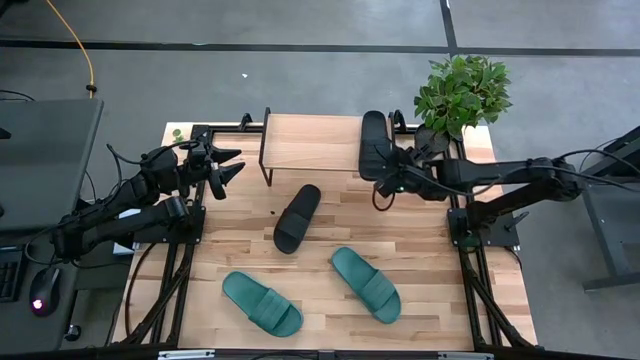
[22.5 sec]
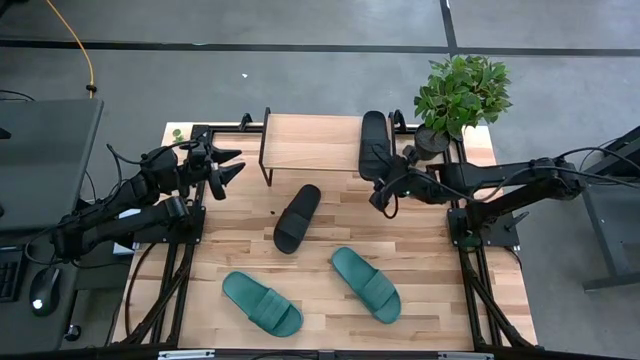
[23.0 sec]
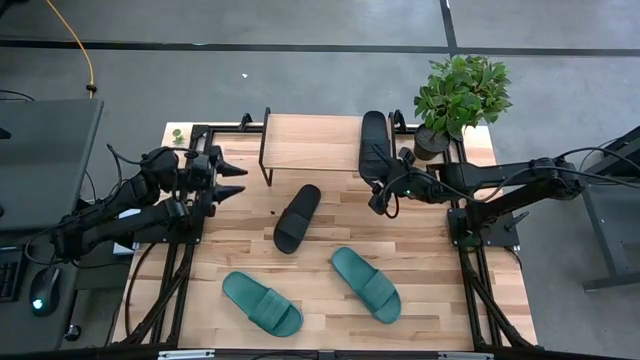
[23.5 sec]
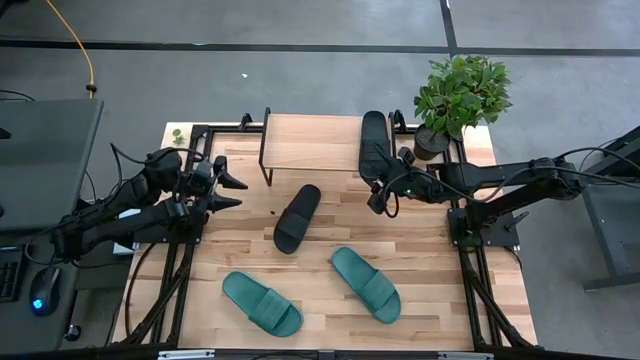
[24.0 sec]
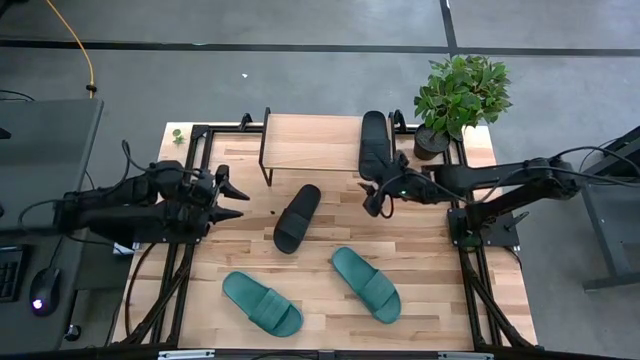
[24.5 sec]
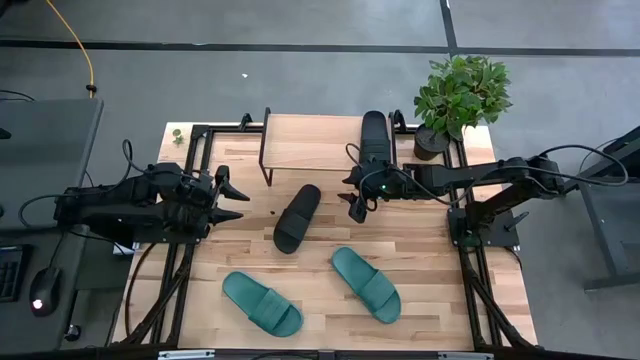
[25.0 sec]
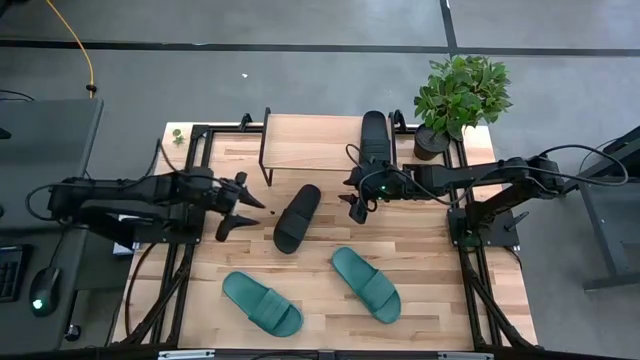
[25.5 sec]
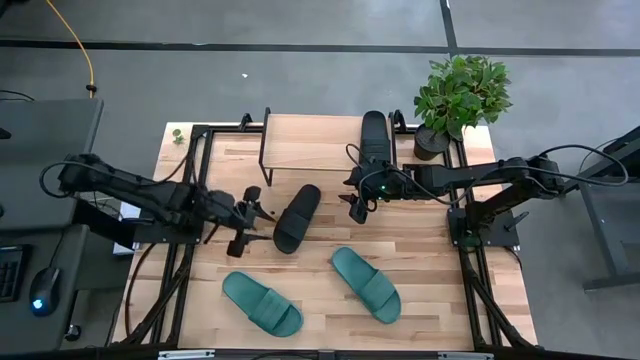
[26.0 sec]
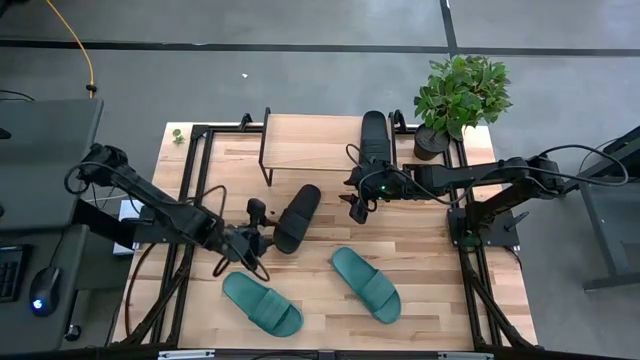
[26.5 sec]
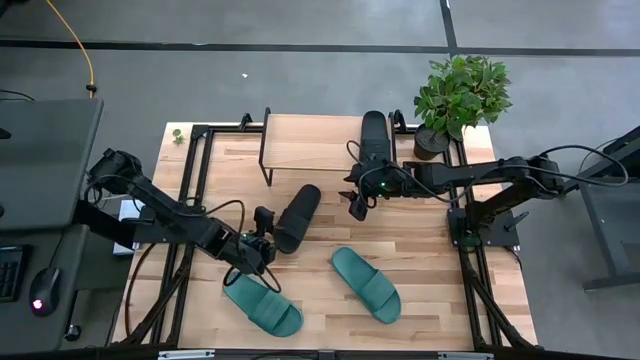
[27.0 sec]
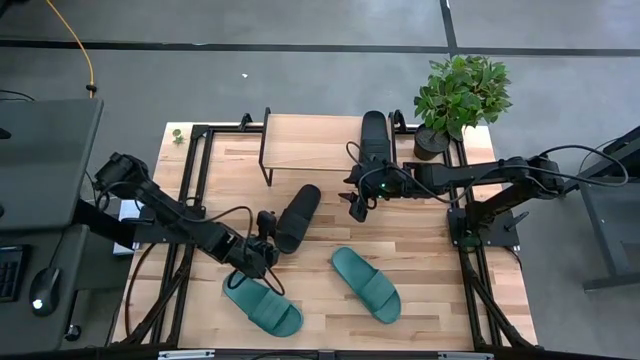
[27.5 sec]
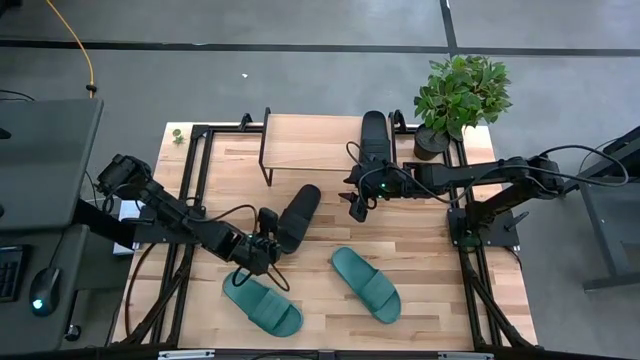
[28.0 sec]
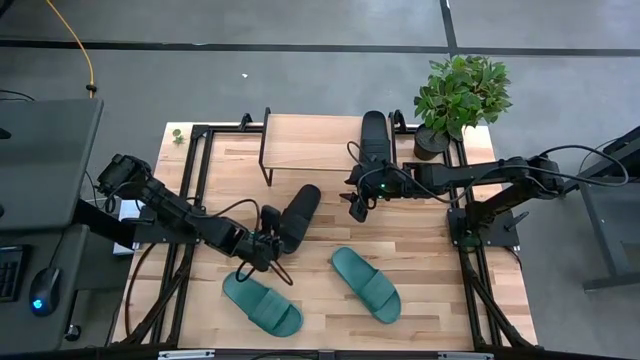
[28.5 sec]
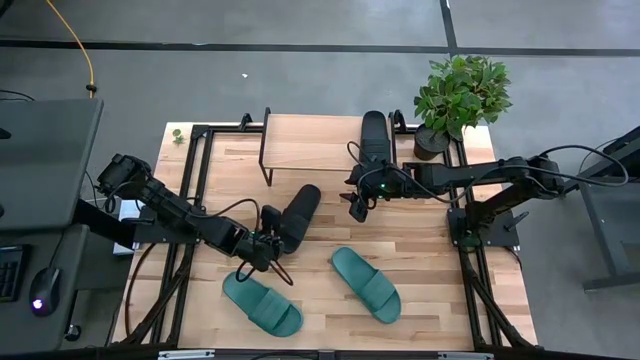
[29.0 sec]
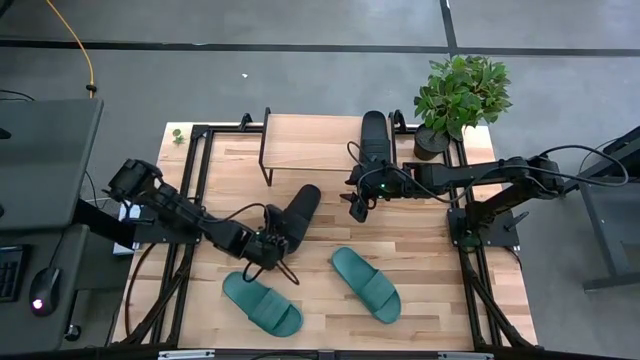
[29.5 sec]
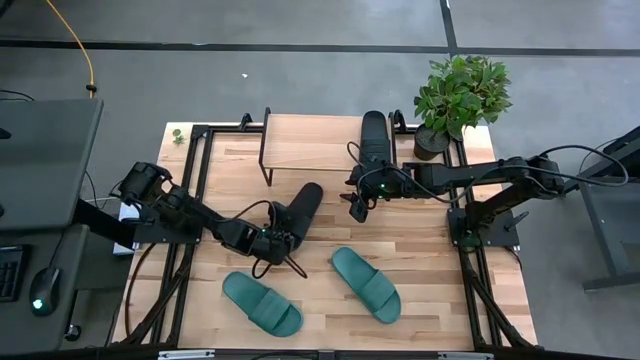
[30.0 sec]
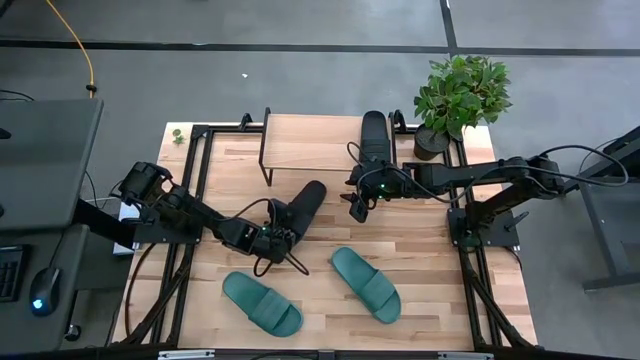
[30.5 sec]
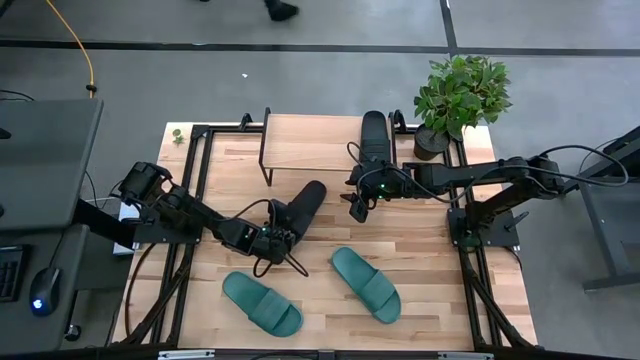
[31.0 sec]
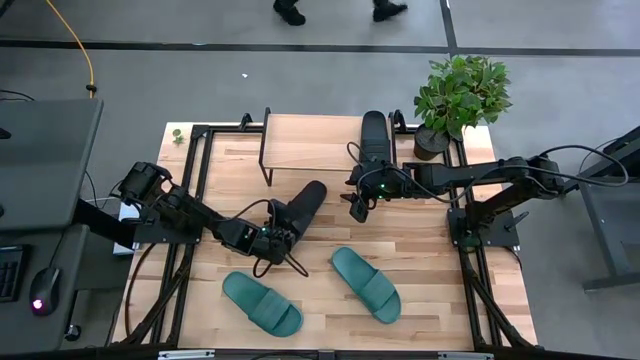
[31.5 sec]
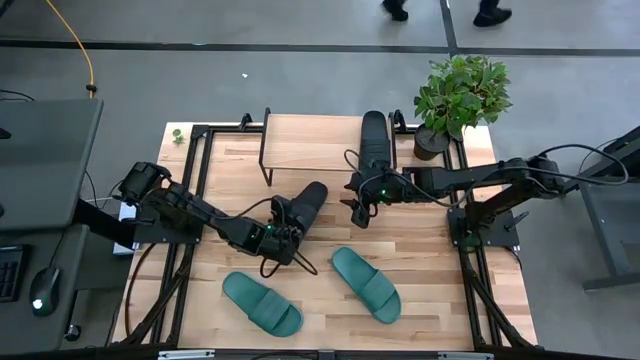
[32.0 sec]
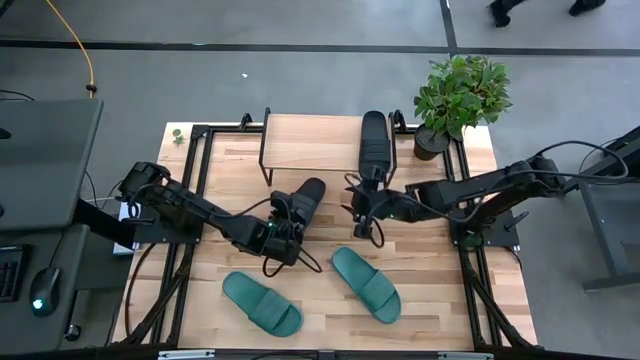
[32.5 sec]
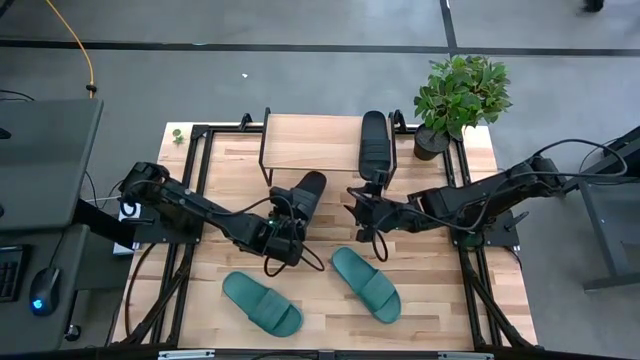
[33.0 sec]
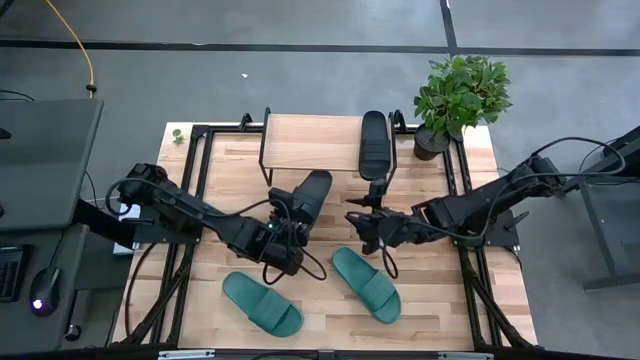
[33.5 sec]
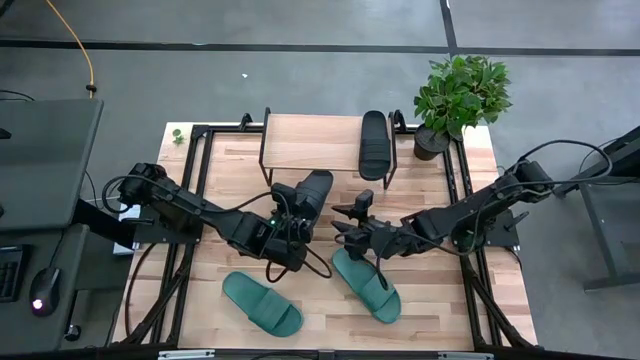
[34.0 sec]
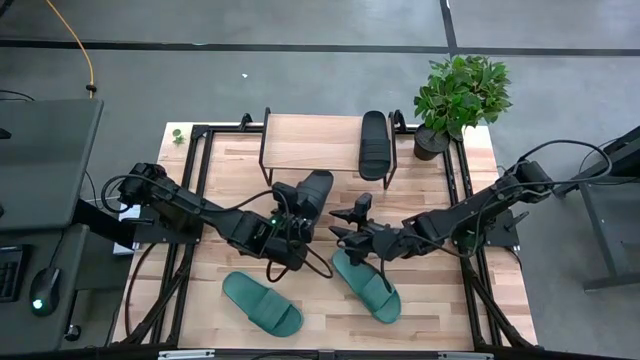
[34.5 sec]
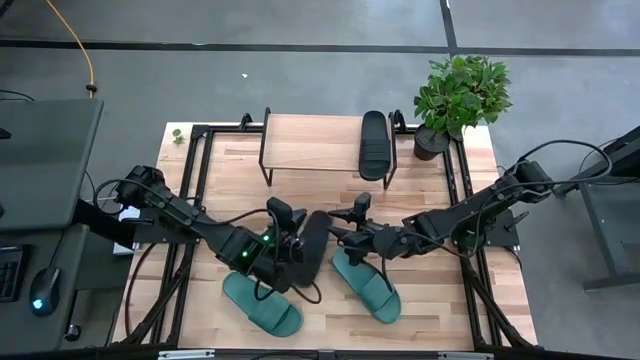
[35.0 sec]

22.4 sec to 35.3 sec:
Task: Pick and place slides into the shelf
Put the black slipper on the shelf

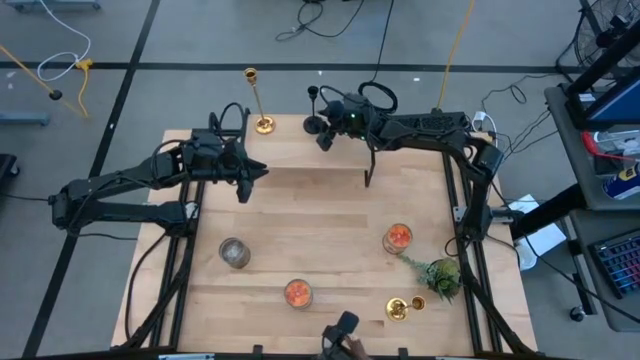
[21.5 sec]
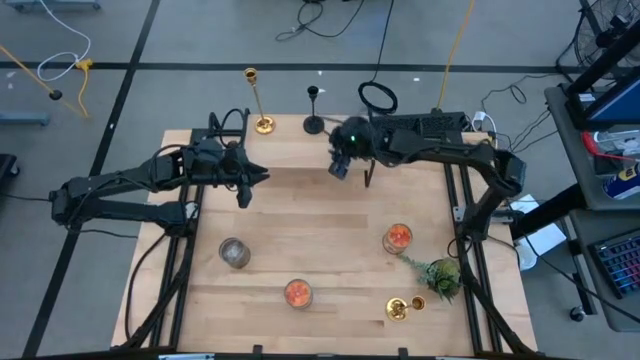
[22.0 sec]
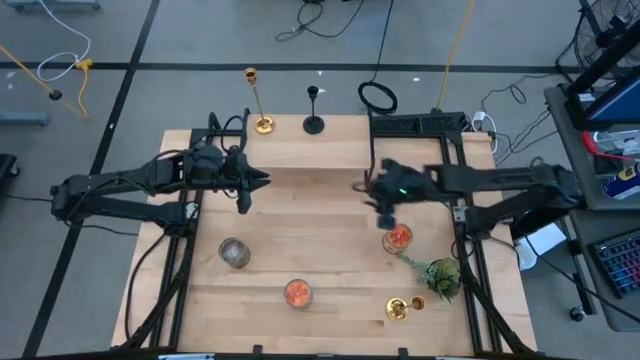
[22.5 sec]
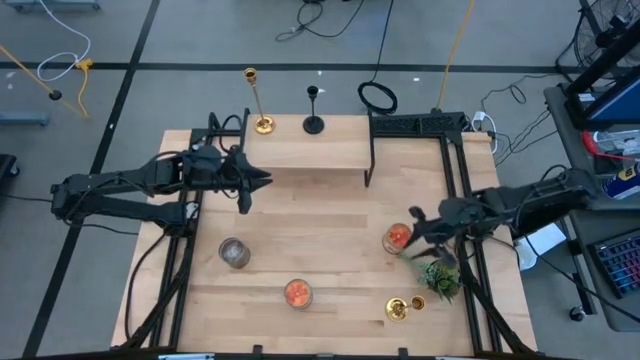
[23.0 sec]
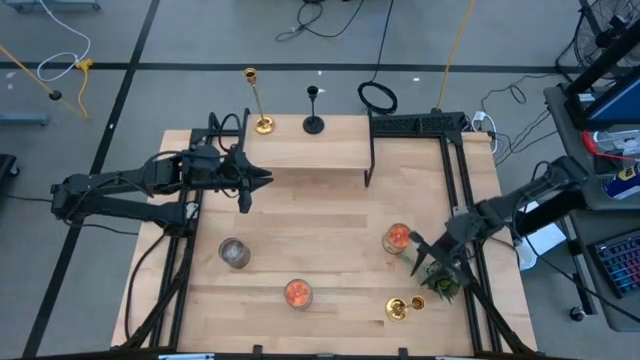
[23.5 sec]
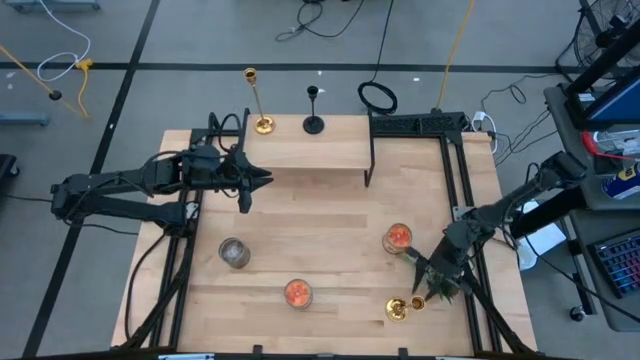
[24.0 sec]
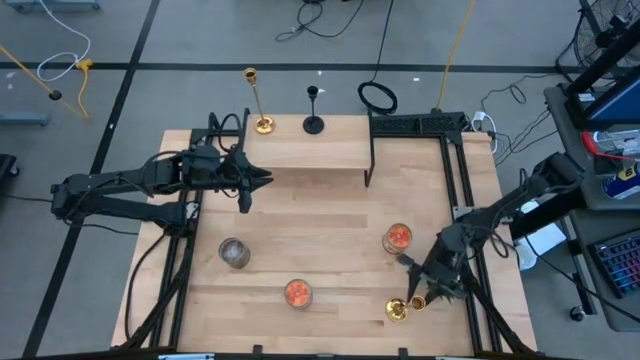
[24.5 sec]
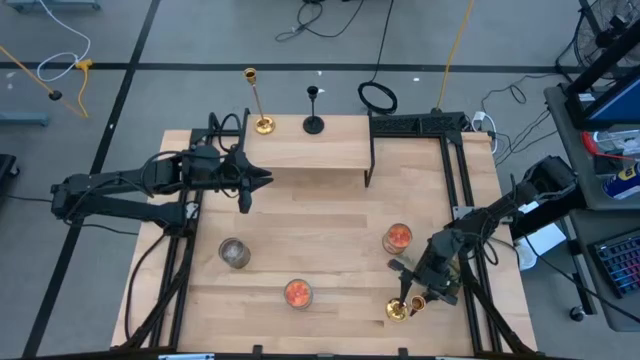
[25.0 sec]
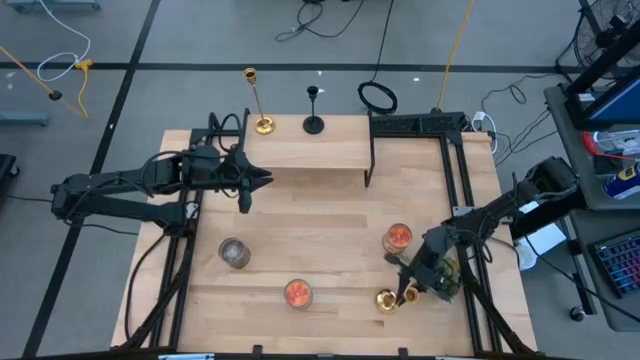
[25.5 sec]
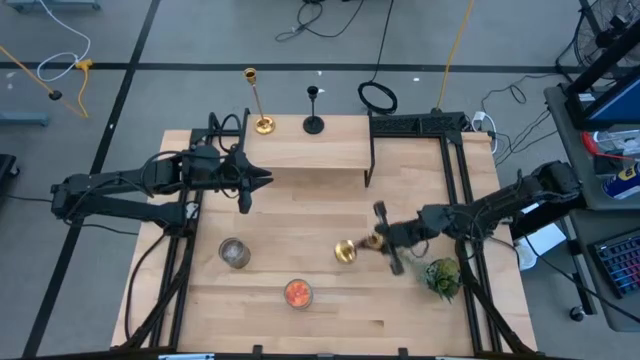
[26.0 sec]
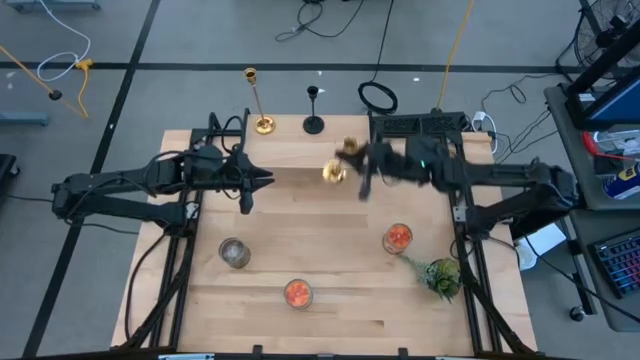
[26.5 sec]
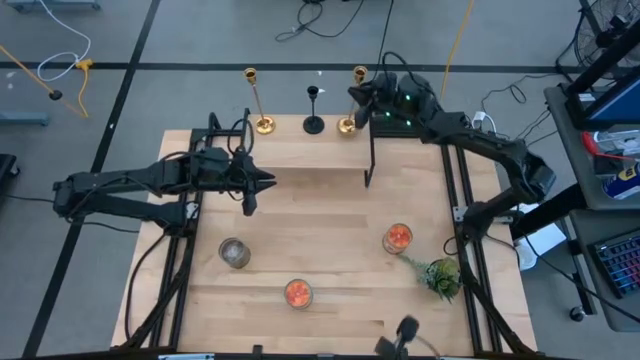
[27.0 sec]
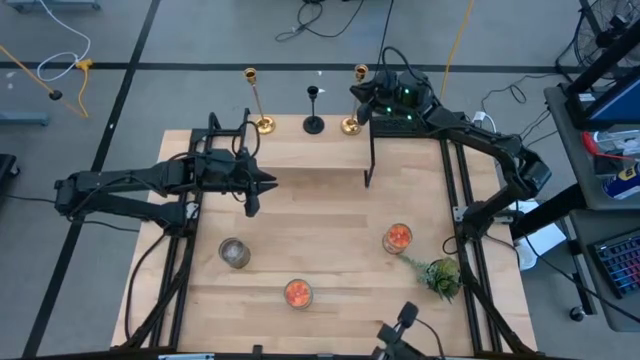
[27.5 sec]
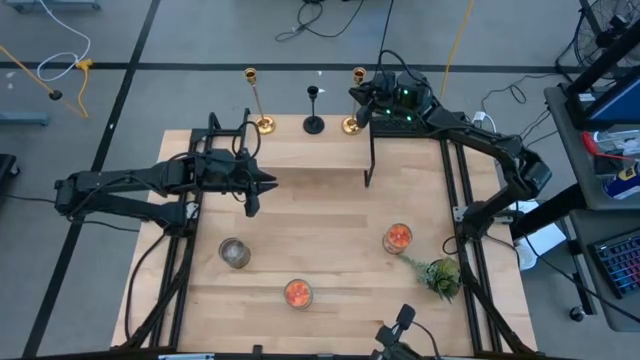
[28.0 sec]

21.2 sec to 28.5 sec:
Task: Pick & Place candle stick holders
Put the light brown candleholder on the shelf
